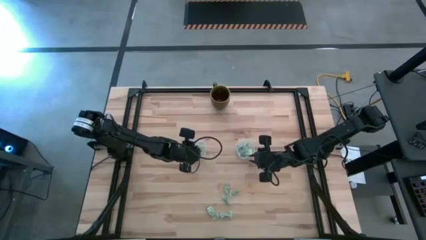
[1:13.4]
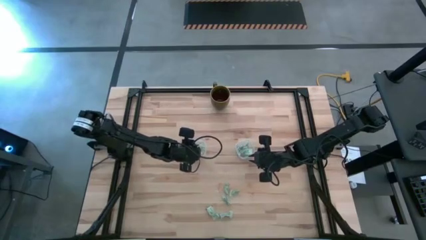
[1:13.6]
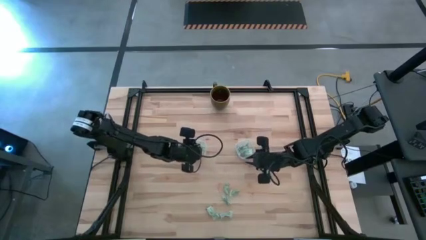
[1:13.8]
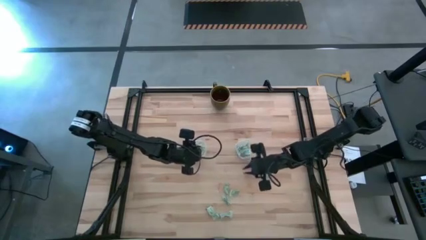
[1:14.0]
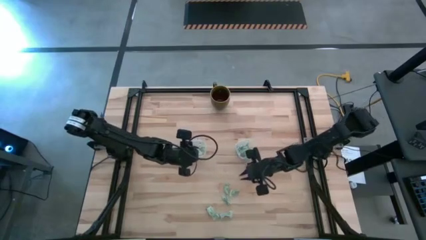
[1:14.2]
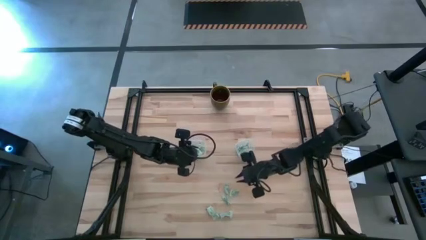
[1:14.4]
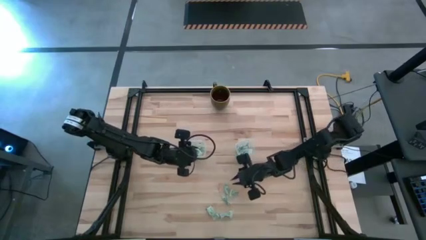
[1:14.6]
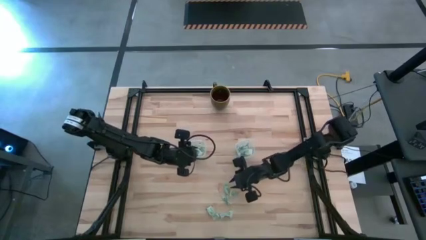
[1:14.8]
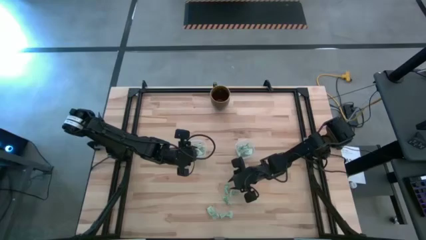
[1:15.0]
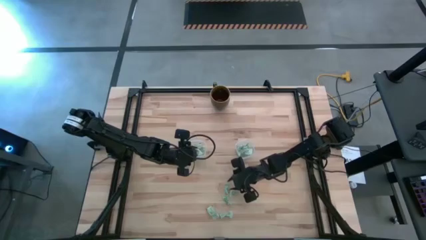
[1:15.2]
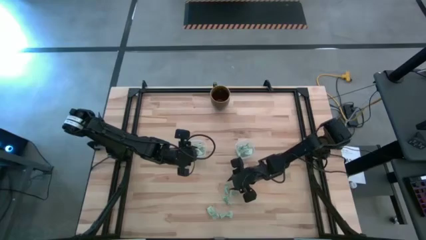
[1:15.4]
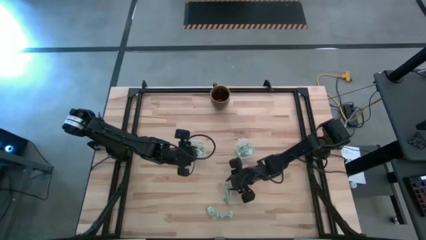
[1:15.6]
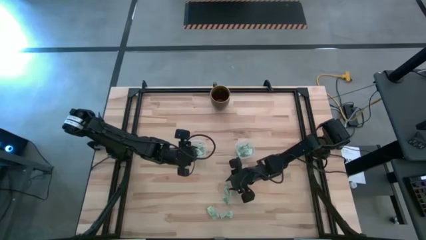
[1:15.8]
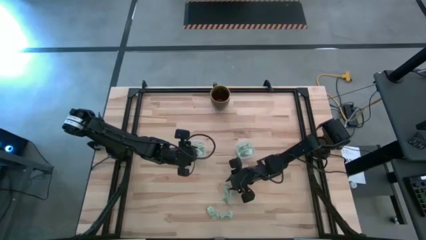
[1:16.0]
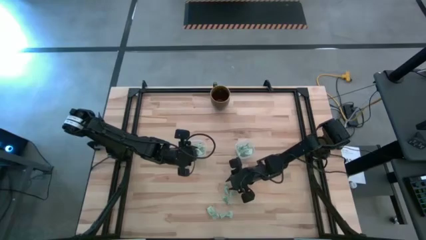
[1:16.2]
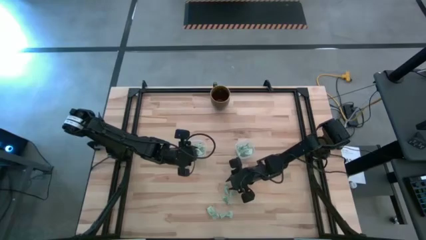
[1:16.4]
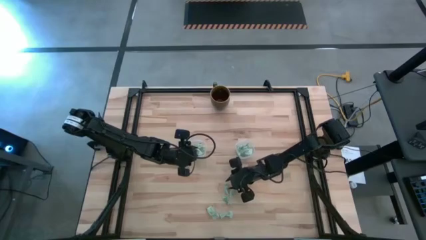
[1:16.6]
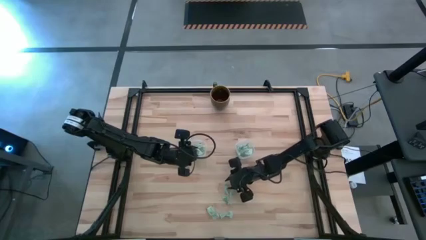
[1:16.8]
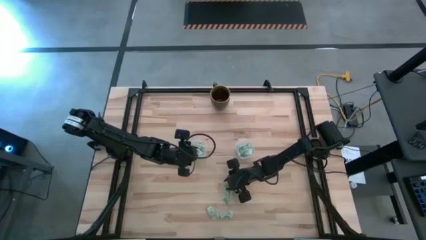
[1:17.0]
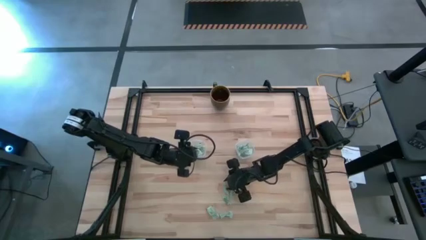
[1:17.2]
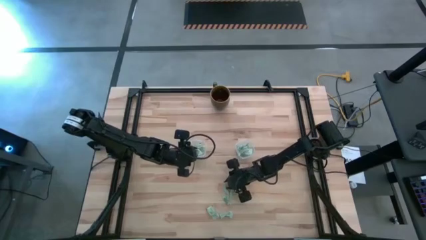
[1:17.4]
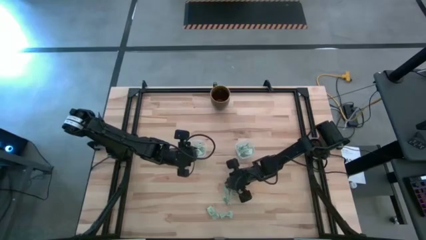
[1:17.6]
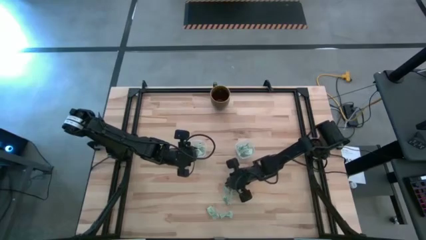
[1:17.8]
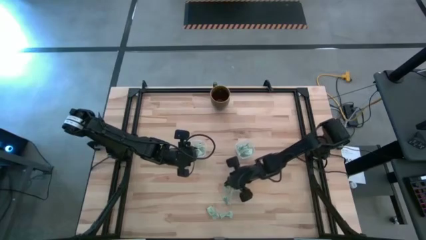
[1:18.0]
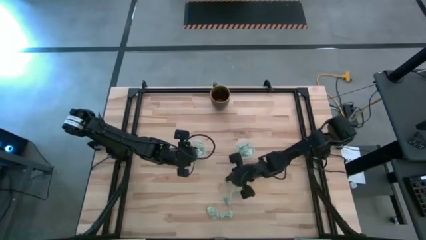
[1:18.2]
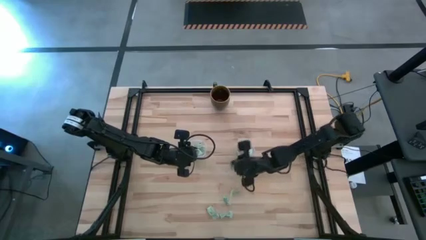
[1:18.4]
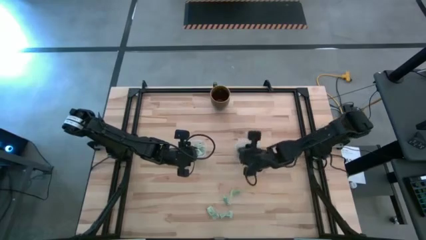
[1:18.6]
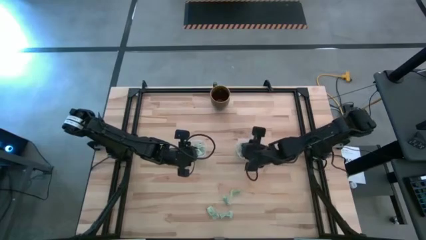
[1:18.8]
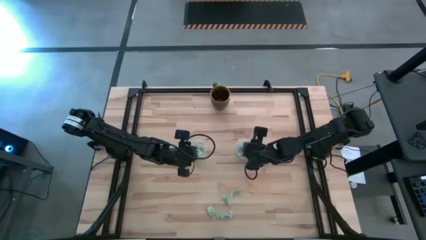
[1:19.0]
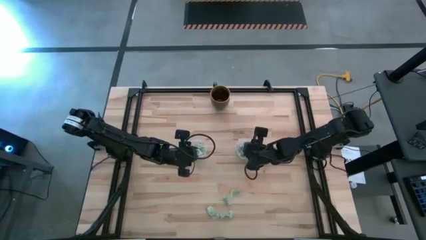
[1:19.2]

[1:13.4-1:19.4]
Task: Pick and place Stevia / Truvia into bins
Put the white stevia packet into the right transparent container

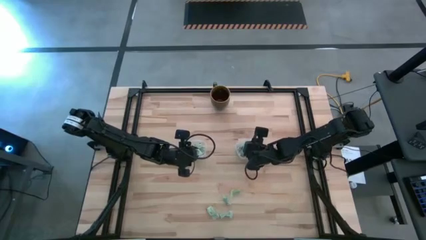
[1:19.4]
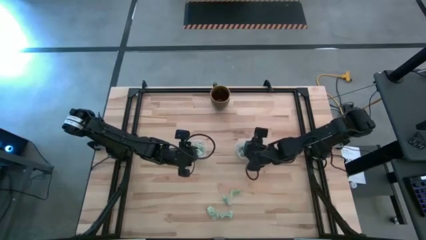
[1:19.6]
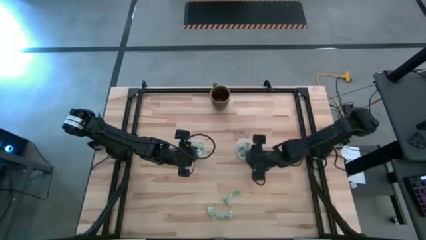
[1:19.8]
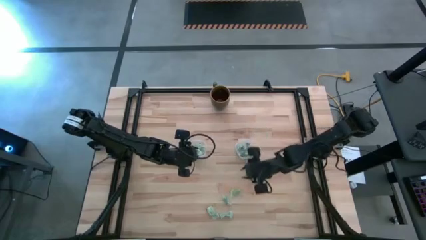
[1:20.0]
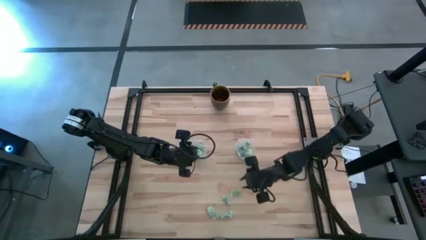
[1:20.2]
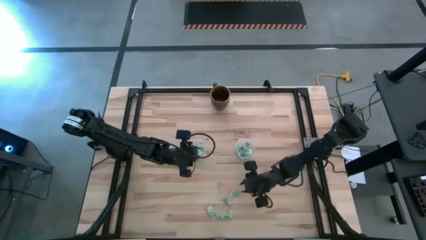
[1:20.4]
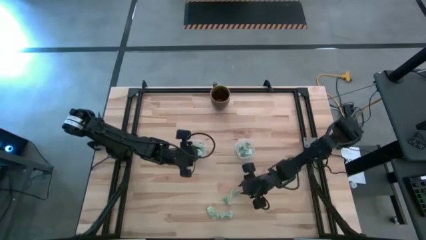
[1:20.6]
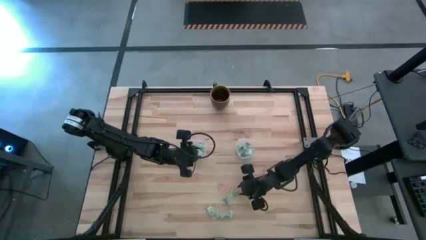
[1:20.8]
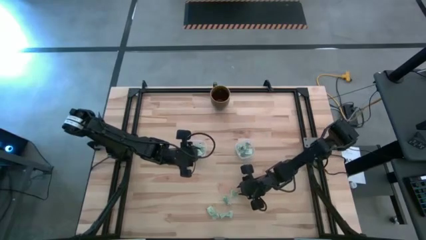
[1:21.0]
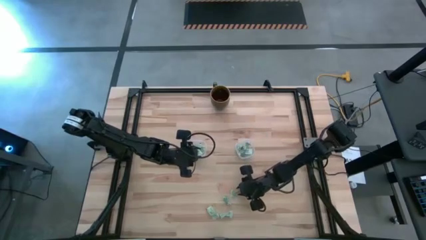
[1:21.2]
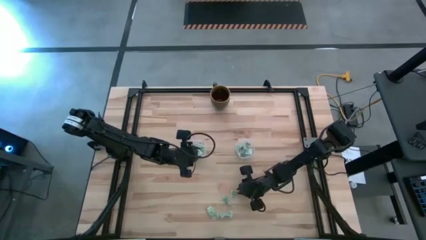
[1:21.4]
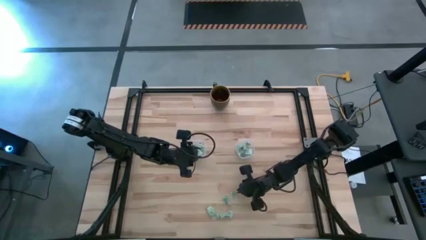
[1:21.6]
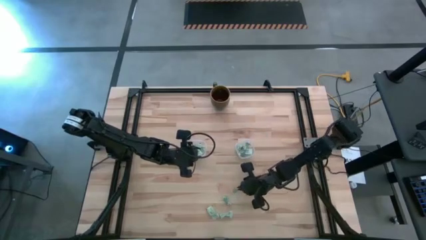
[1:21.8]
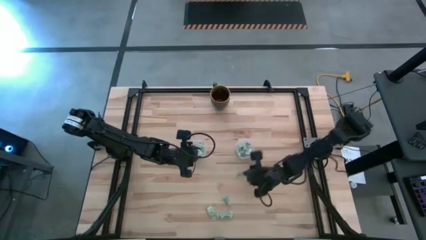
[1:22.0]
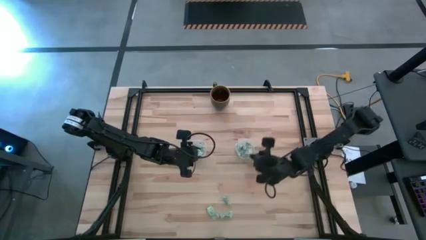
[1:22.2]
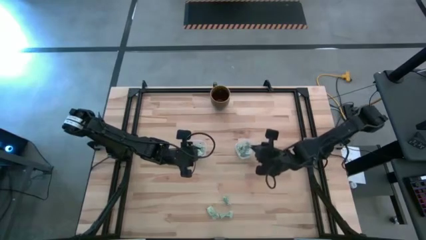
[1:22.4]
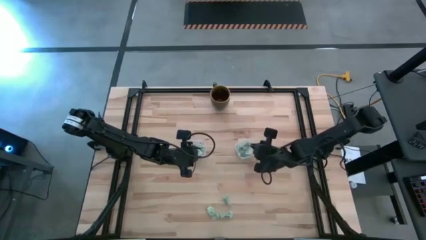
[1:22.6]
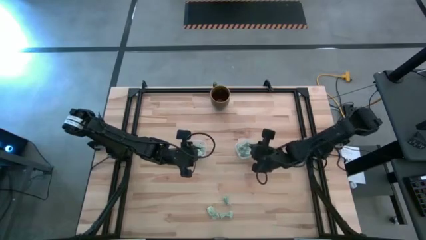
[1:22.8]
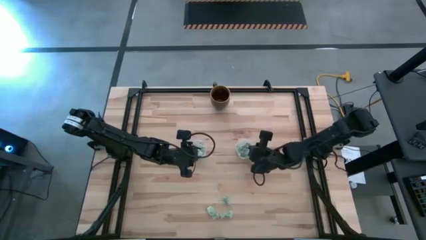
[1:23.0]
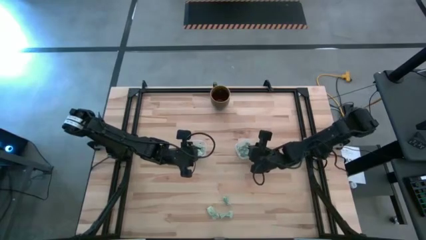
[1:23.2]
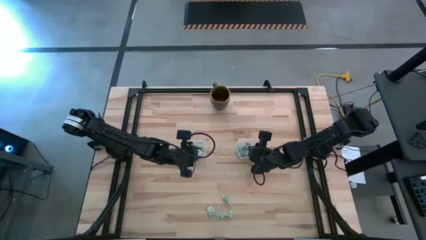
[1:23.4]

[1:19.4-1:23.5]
Put the white stevia packet into the right transparent container

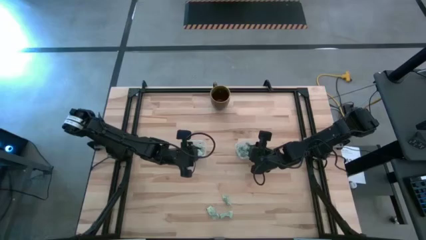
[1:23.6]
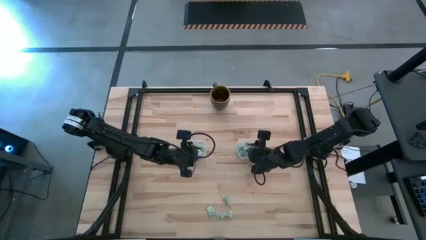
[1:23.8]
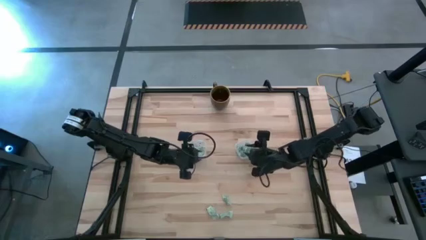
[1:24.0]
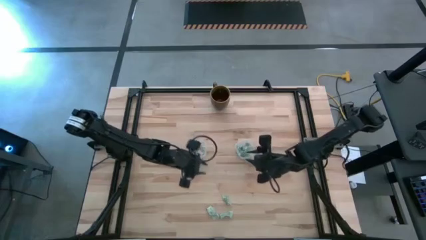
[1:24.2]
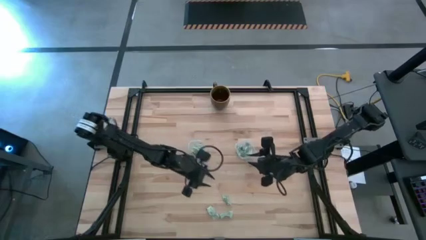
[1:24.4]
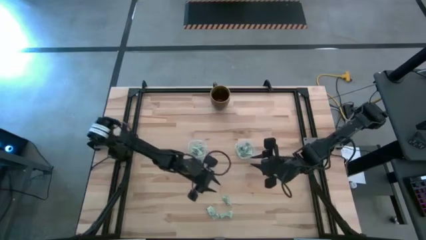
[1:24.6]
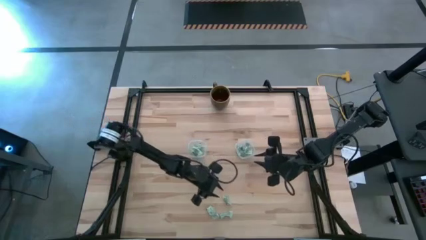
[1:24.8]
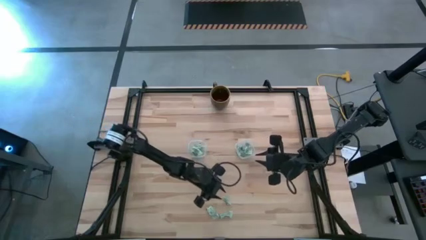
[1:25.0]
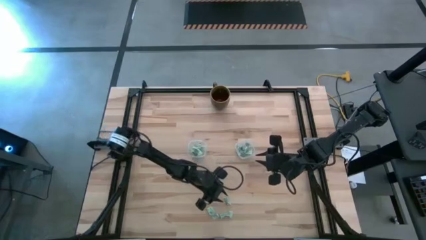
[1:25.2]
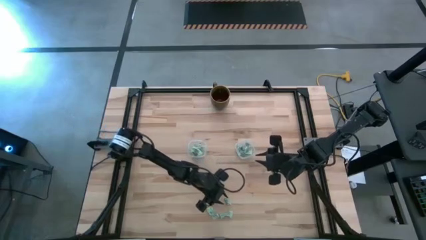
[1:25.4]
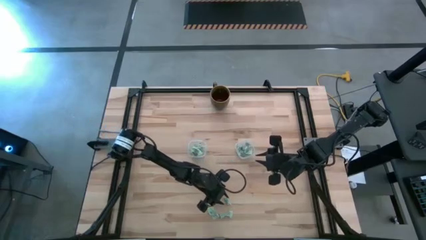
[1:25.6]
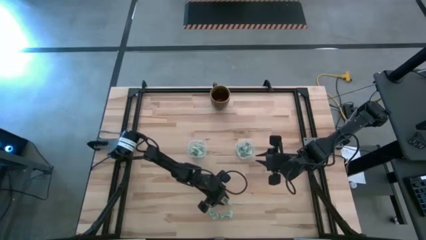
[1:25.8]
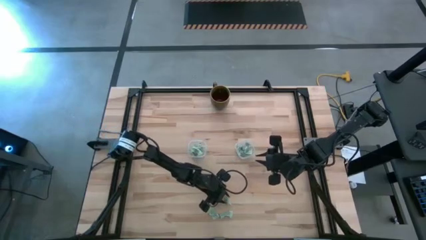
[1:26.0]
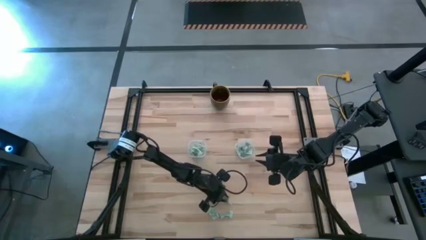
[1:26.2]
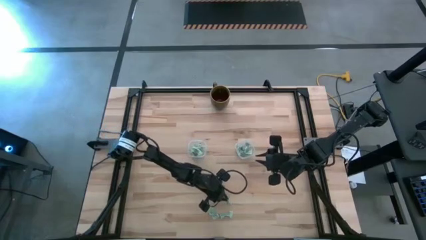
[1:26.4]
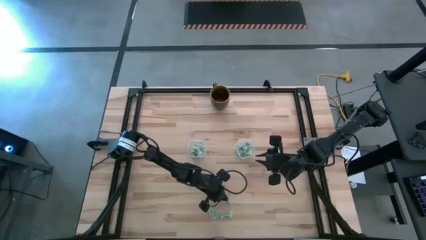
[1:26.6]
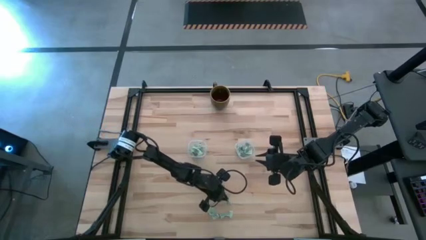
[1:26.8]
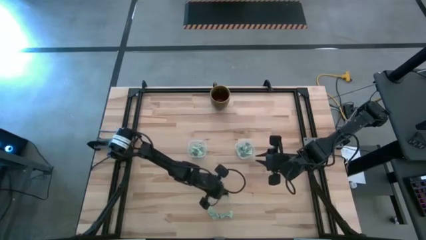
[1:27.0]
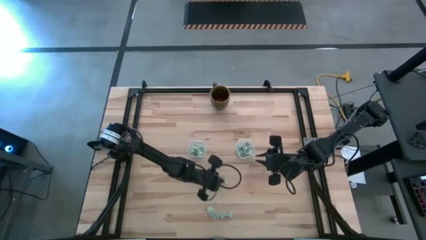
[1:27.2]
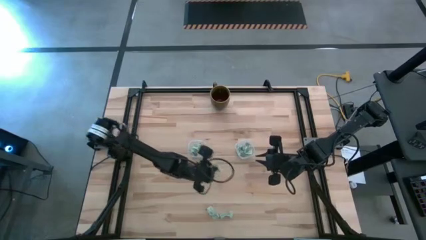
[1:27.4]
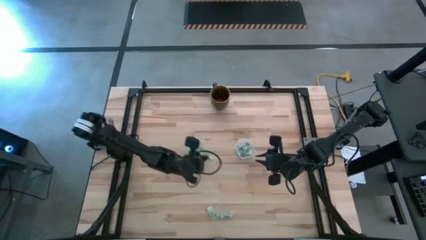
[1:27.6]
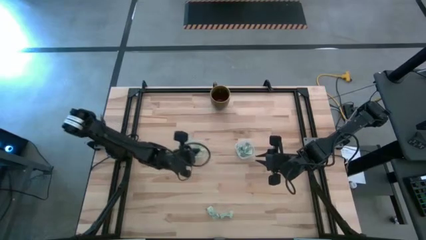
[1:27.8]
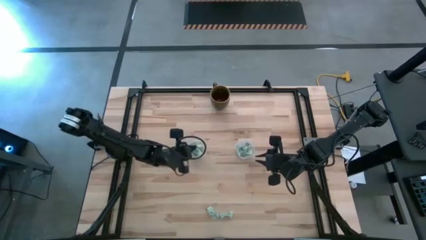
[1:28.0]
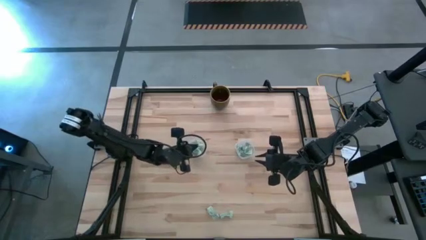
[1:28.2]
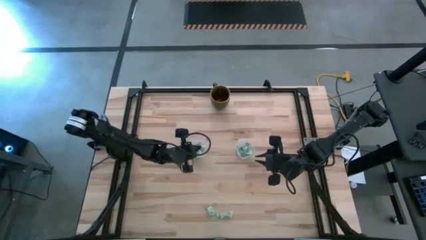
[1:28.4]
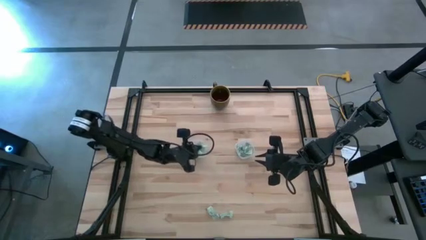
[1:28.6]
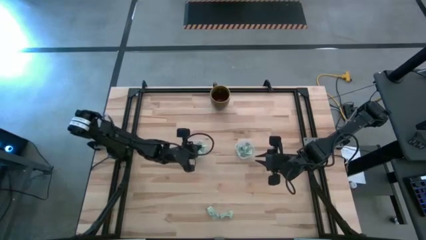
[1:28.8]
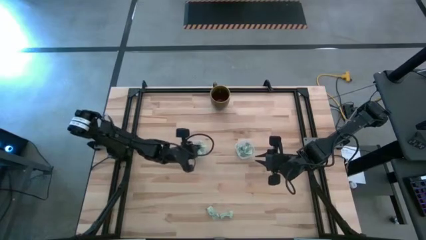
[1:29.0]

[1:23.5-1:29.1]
Put the white stevia packet into the left transparent container
